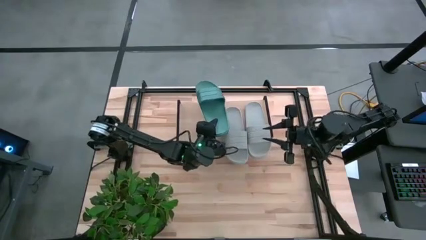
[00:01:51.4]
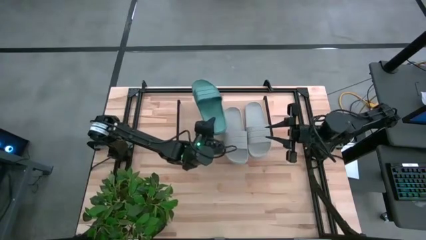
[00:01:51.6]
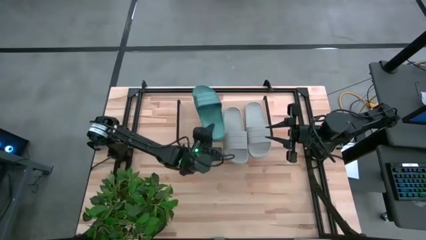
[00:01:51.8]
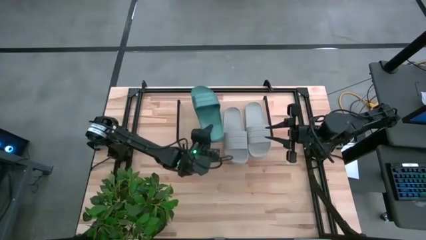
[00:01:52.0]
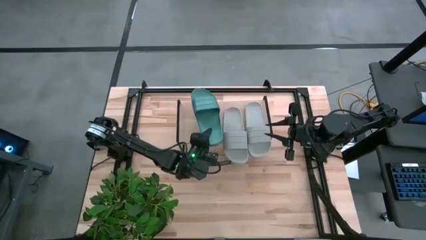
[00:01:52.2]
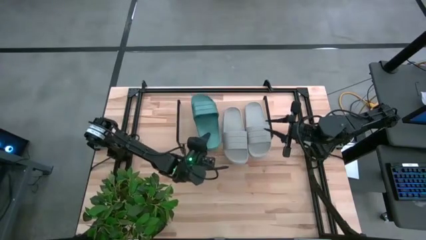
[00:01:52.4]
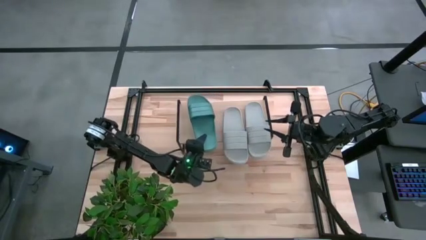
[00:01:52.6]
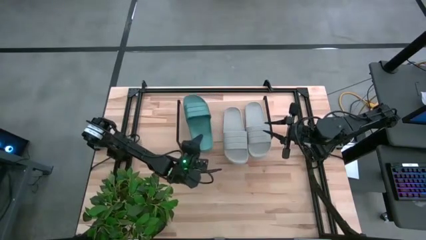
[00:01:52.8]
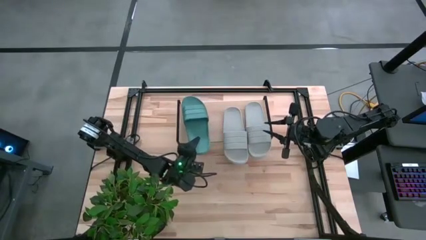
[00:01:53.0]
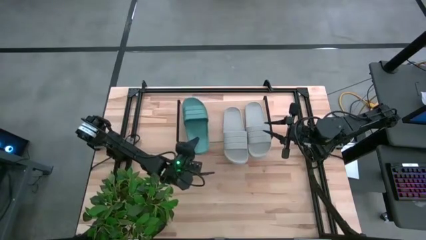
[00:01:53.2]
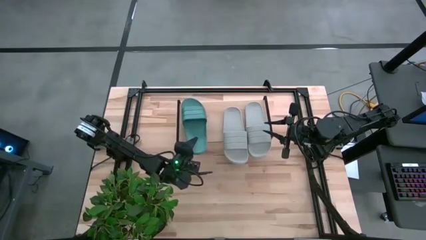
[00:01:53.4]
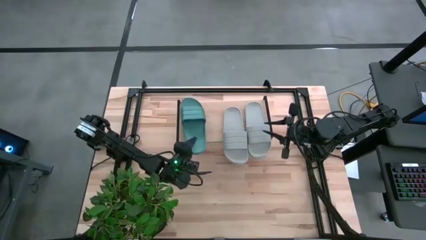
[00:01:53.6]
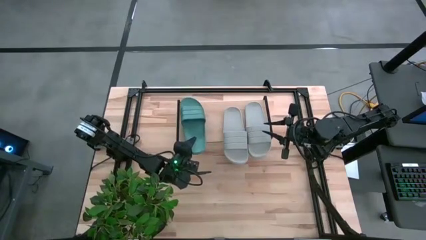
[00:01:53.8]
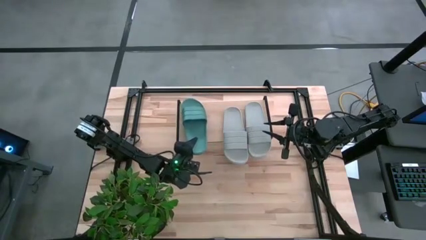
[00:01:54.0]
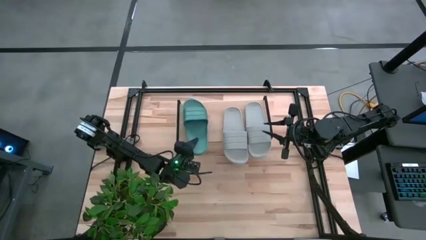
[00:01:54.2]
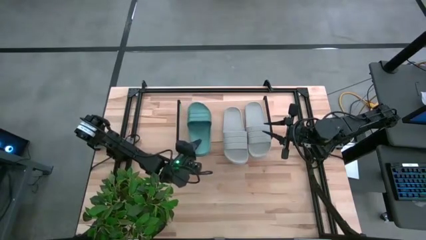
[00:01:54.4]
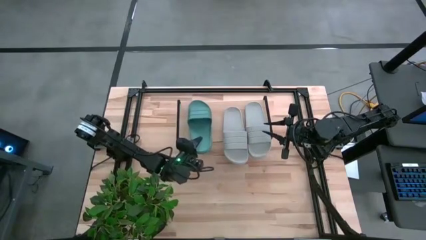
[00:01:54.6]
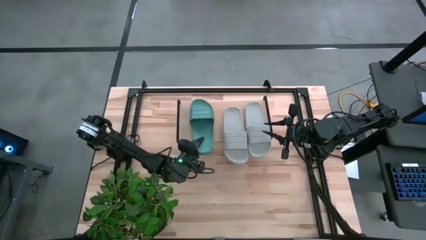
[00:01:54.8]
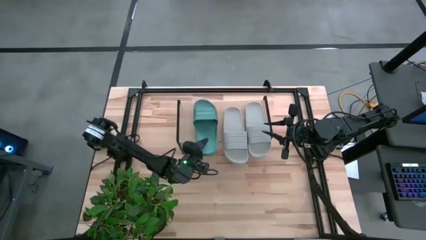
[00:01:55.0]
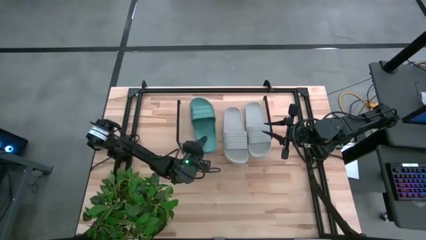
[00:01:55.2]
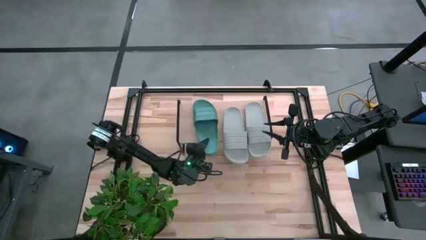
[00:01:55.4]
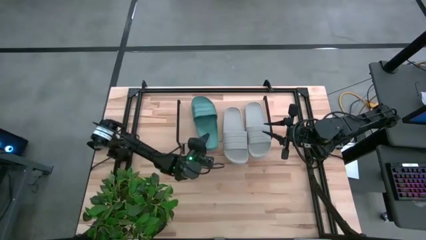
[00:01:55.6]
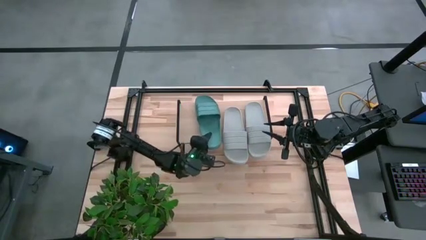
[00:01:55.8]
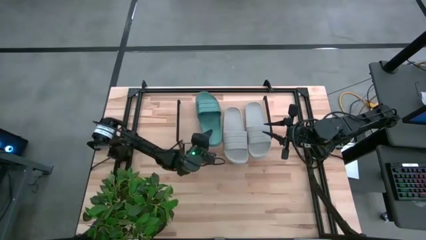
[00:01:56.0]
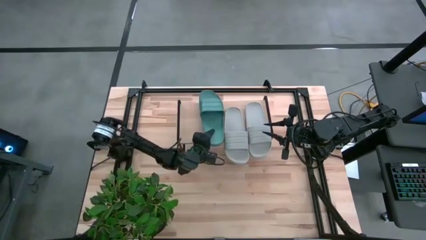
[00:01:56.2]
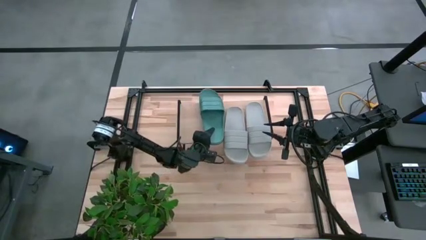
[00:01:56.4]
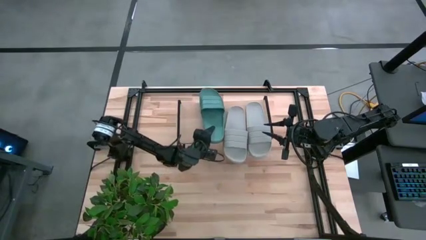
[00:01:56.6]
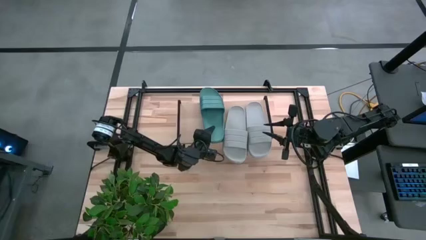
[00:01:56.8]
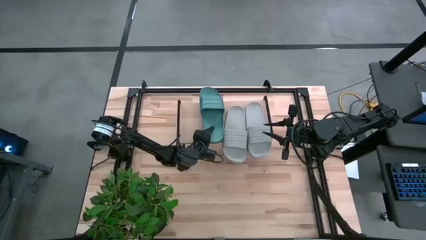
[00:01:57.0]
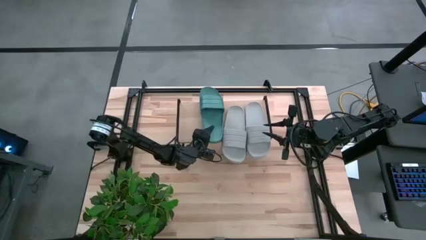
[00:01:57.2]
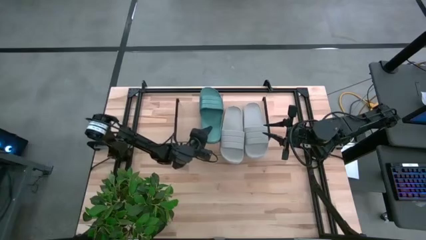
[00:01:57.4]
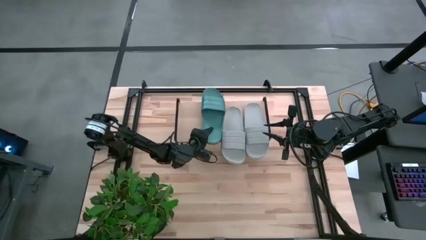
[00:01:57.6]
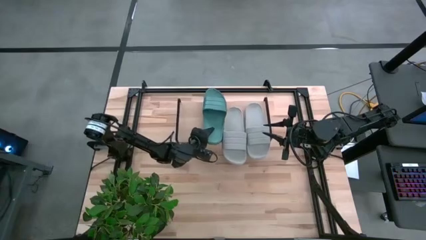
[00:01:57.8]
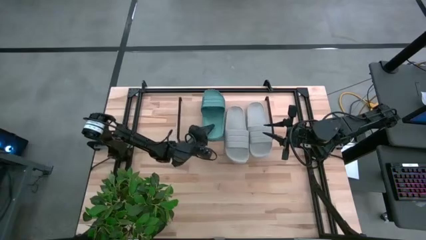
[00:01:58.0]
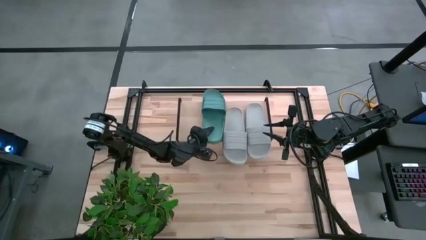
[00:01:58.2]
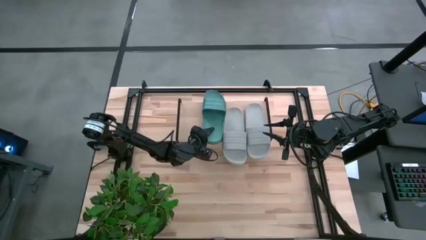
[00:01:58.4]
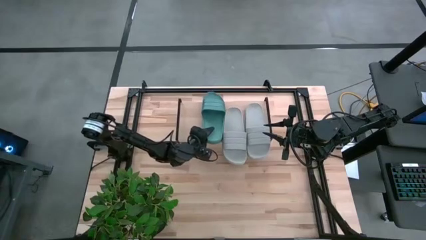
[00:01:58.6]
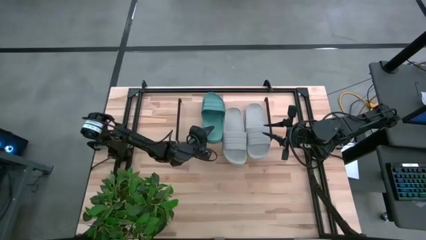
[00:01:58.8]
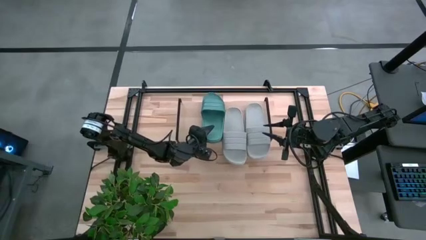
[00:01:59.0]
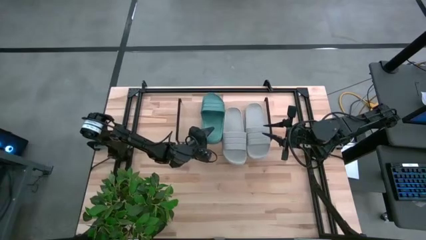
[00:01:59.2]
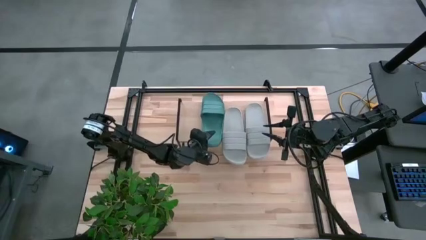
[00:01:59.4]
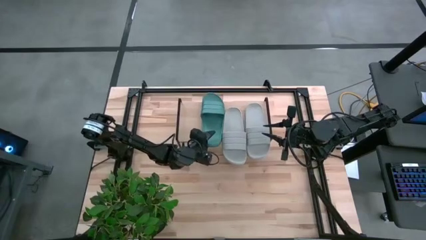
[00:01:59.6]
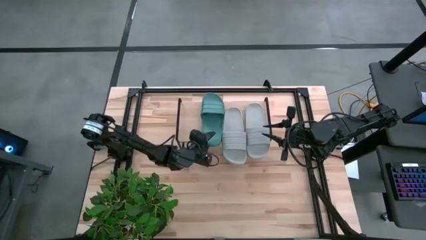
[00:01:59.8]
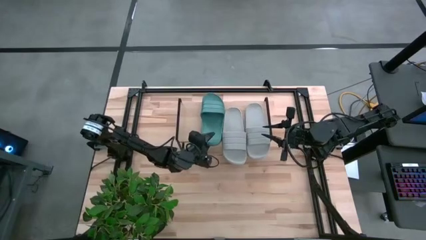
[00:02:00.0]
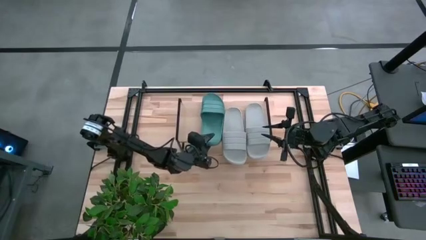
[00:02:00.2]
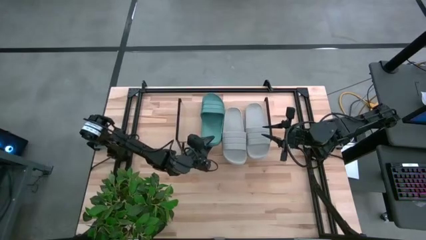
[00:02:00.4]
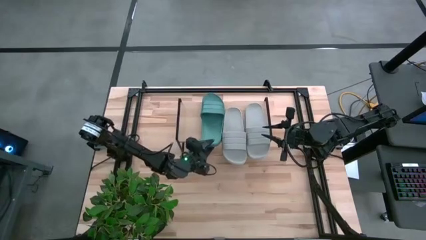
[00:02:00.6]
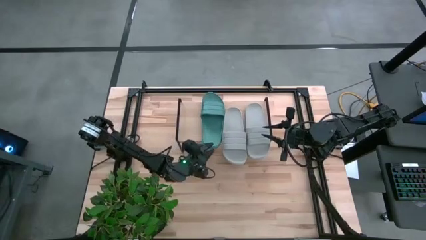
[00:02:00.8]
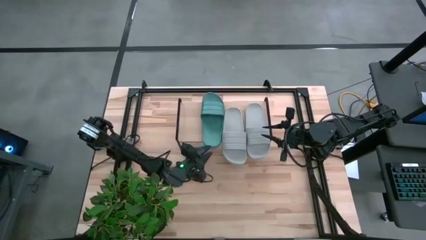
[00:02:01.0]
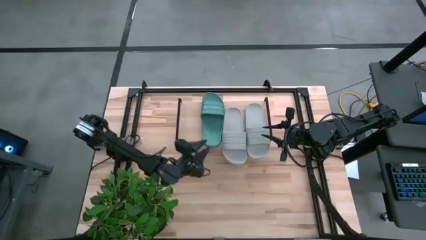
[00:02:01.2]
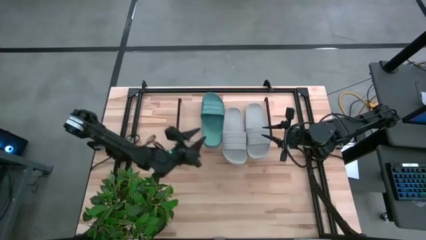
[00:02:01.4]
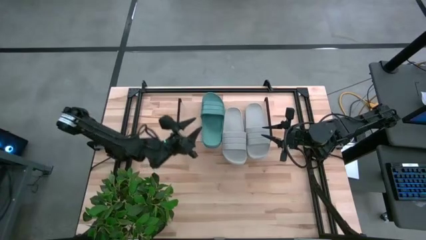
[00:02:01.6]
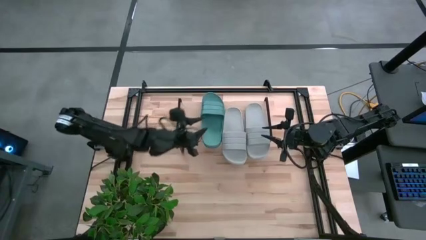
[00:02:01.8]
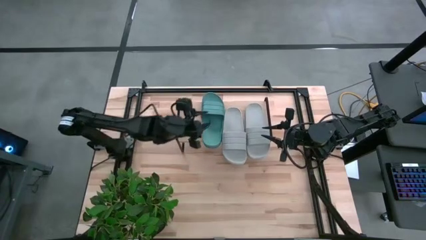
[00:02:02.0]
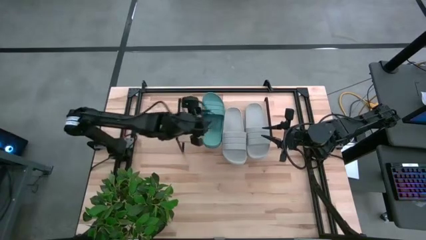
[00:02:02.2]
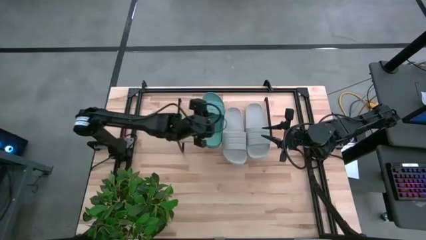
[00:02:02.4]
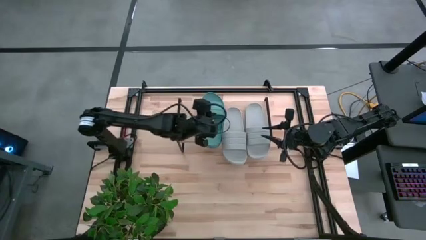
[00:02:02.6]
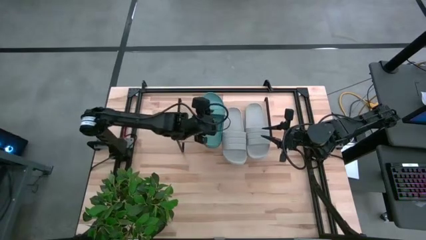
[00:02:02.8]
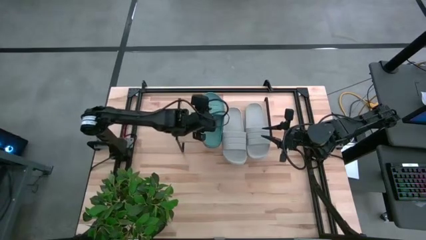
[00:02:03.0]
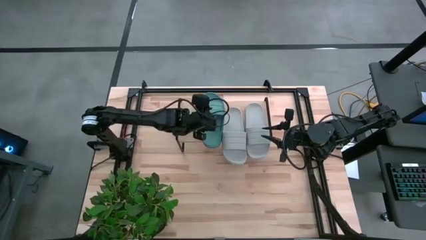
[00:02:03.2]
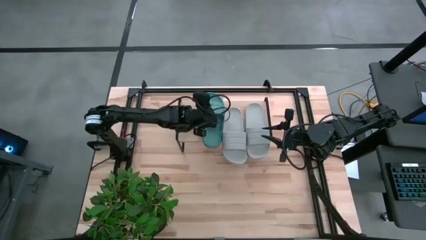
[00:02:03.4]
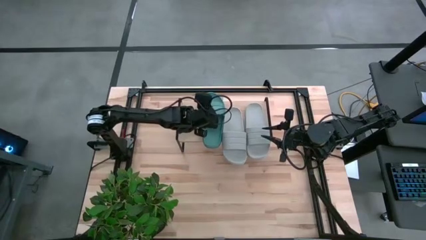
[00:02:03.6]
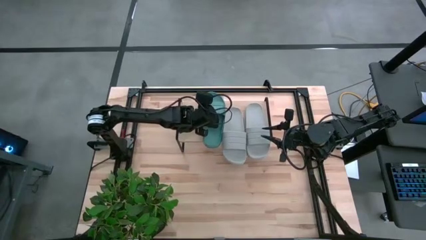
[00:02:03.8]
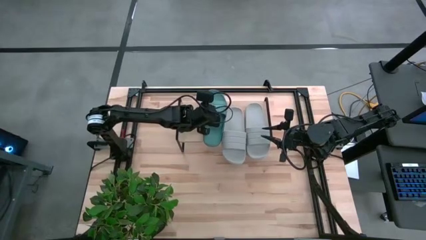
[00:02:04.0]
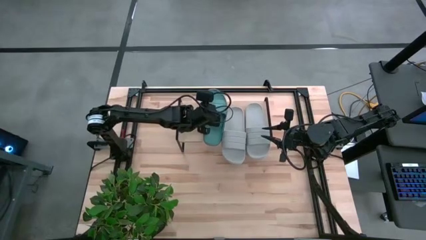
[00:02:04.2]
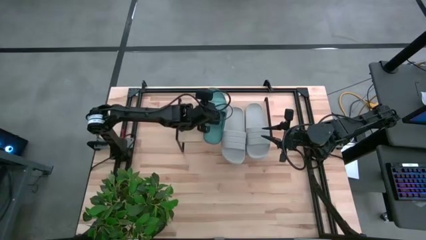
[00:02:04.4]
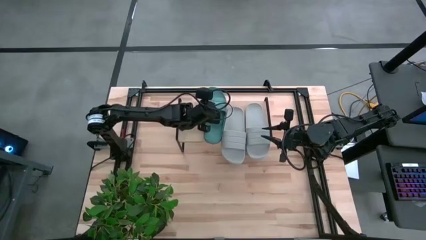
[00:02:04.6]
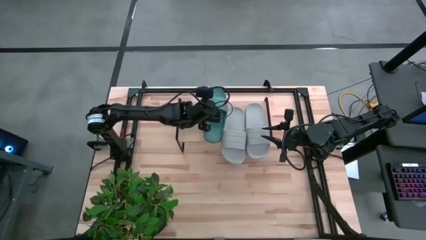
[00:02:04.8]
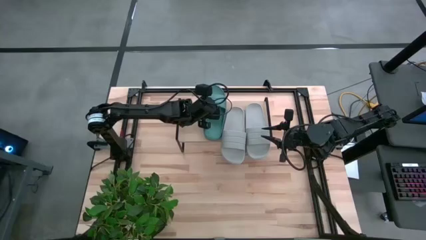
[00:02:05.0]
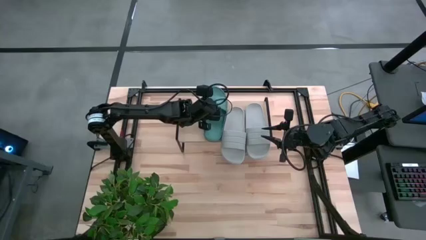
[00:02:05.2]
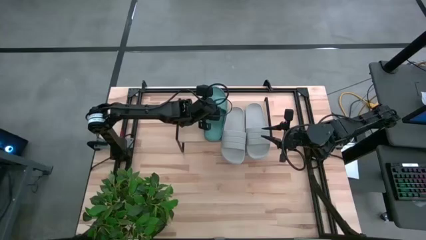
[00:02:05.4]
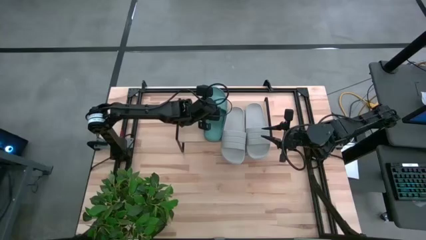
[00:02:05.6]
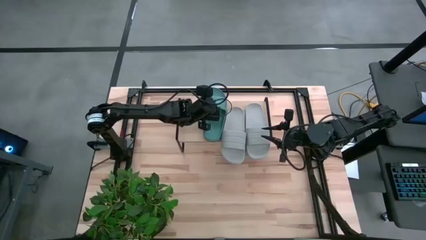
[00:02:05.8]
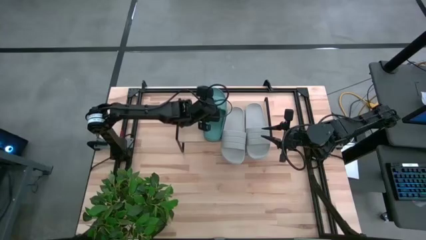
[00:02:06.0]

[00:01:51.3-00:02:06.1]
Task: Pick and place slides into the shelf
Put the left green slides on the shelf

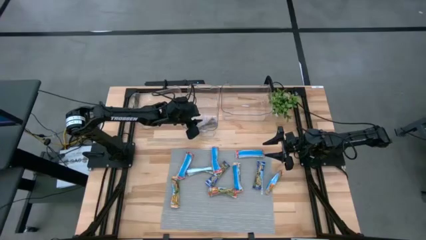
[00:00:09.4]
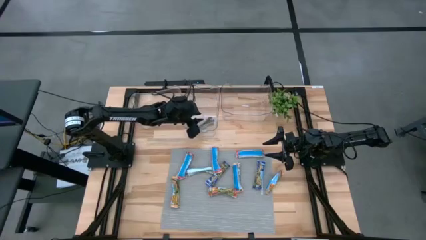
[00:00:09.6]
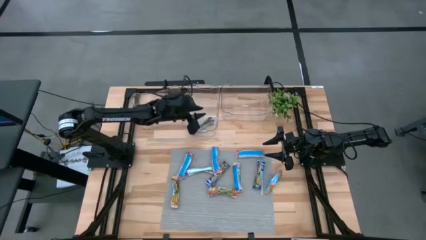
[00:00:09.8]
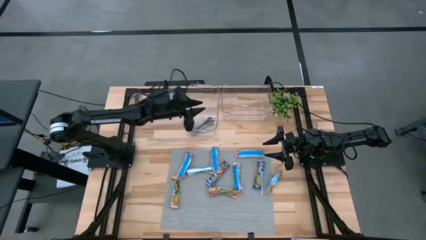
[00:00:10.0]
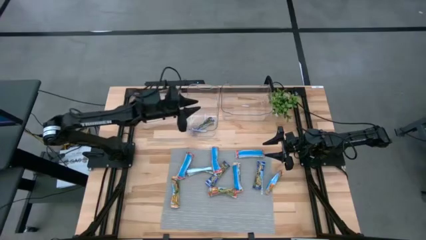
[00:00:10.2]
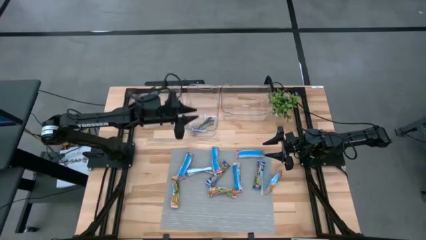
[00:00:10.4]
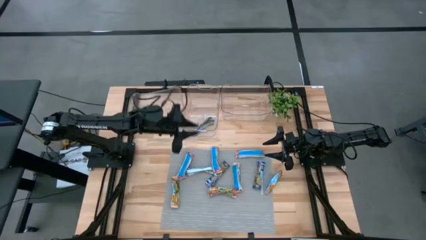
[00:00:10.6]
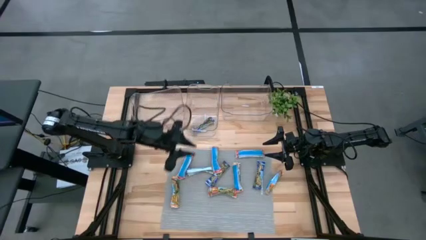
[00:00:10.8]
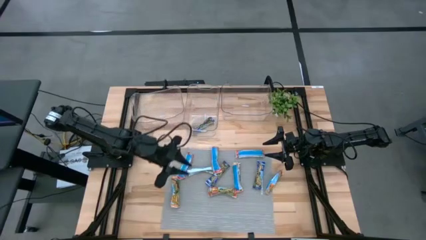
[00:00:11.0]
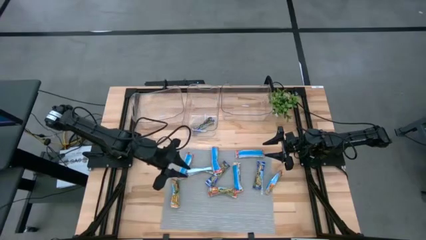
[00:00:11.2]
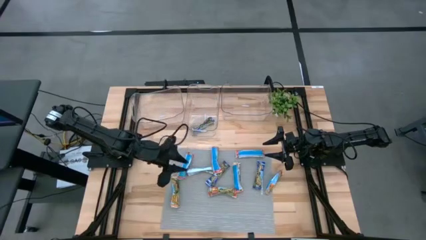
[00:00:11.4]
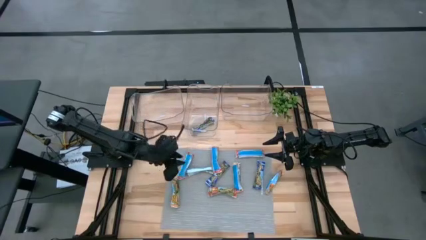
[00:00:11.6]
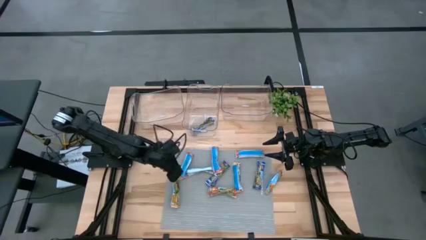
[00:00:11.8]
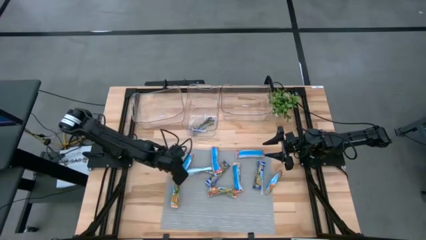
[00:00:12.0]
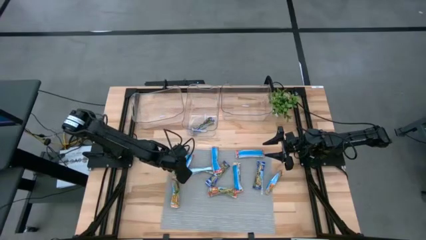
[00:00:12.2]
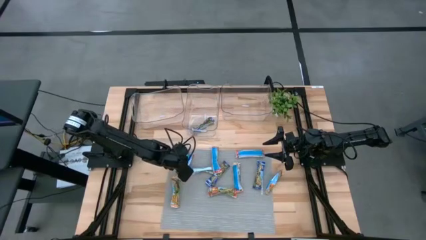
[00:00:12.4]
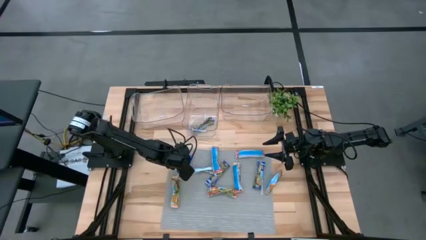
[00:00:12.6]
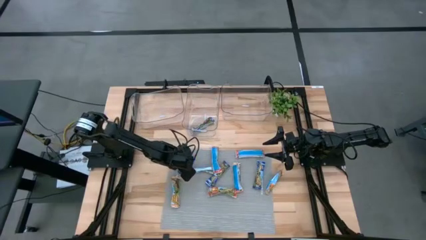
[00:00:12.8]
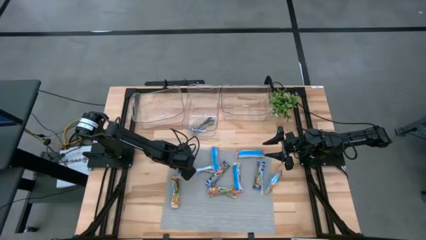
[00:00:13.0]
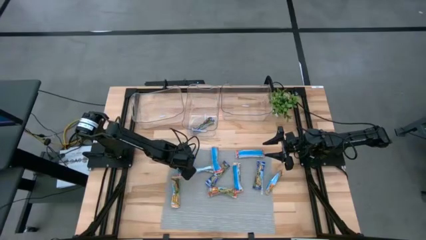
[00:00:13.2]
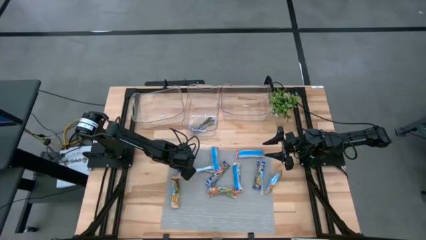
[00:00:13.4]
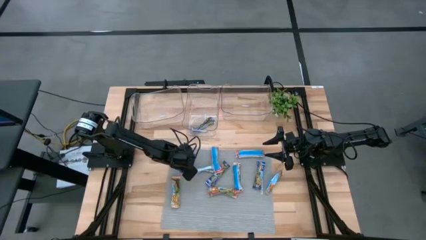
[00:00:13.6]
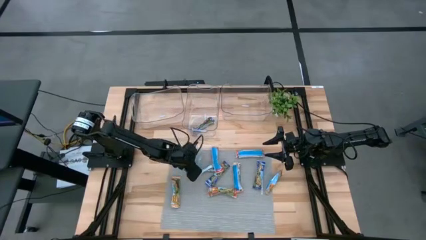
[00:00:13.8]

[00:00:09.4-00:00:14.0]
Task: Pick and place Granola Bars by type
Put the top left red granola bar into the left transparent bin
